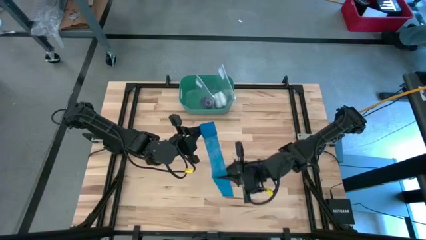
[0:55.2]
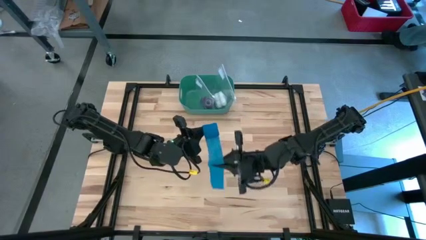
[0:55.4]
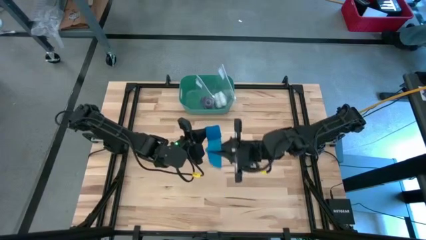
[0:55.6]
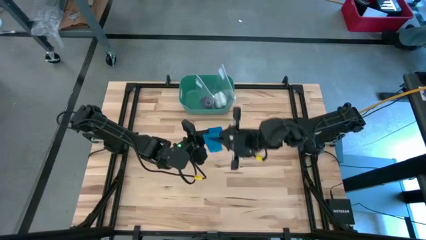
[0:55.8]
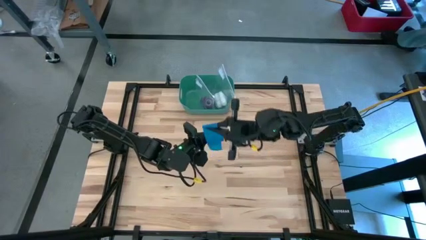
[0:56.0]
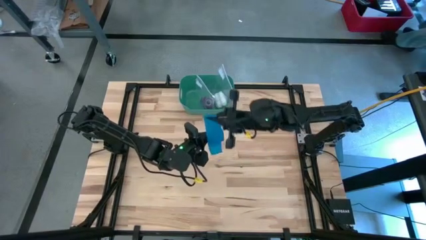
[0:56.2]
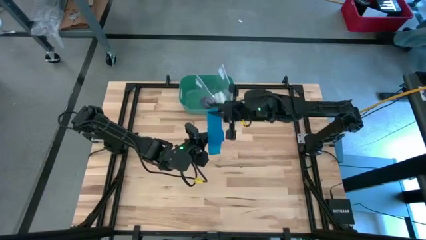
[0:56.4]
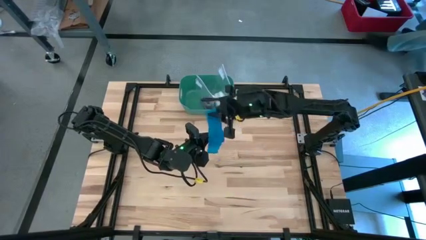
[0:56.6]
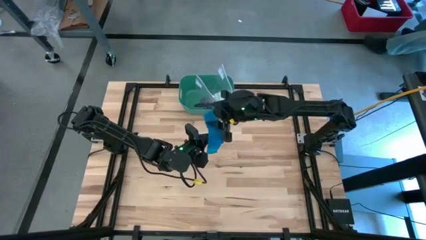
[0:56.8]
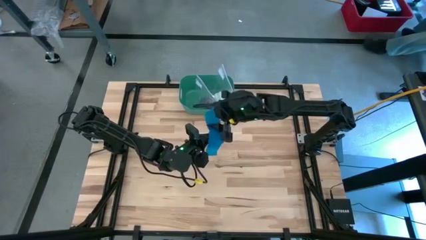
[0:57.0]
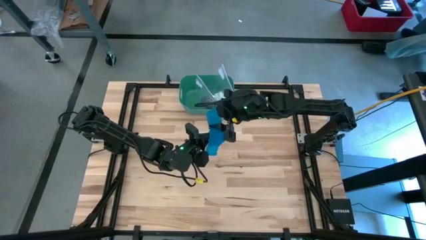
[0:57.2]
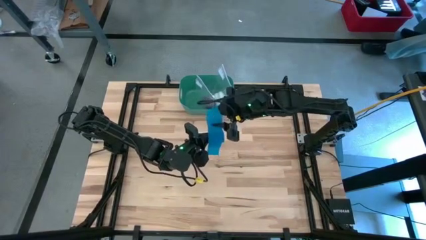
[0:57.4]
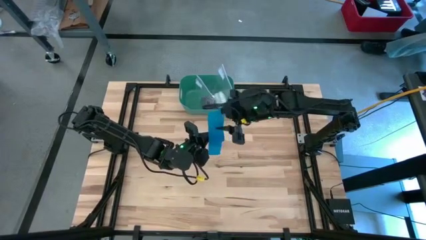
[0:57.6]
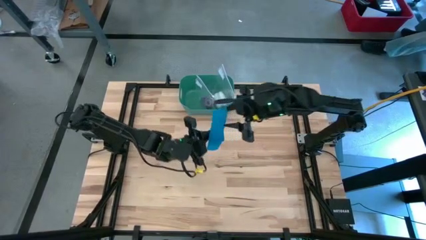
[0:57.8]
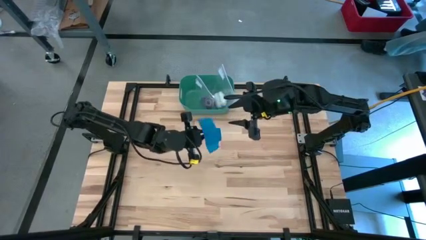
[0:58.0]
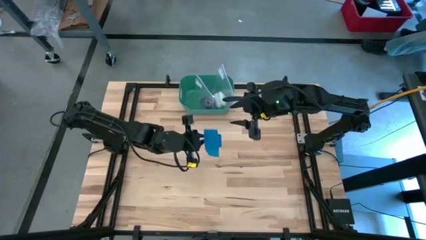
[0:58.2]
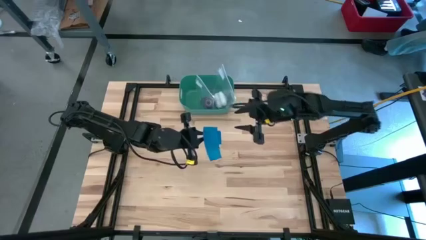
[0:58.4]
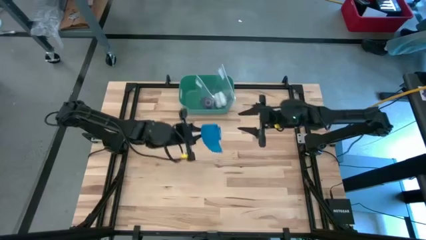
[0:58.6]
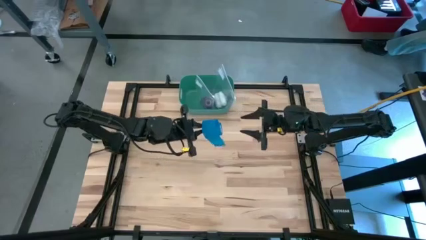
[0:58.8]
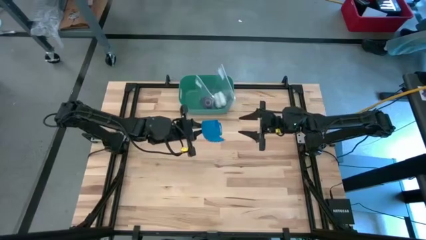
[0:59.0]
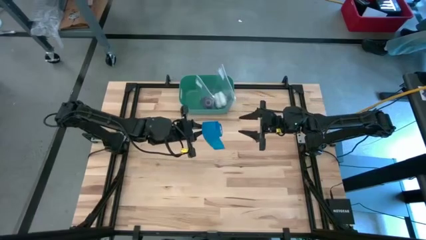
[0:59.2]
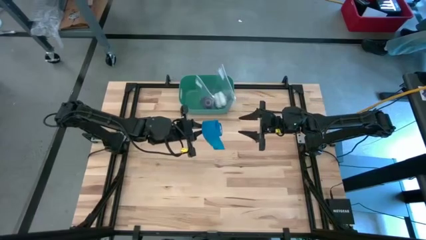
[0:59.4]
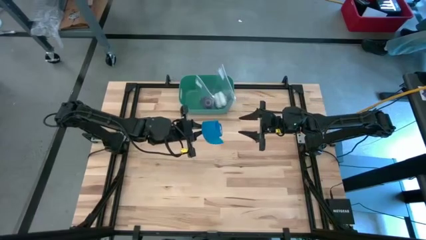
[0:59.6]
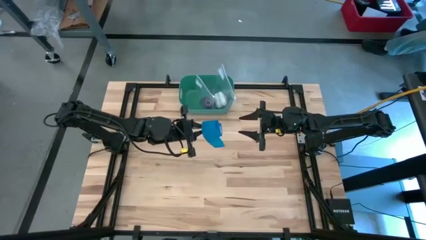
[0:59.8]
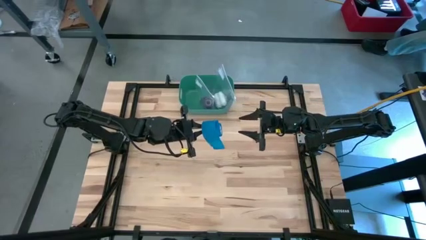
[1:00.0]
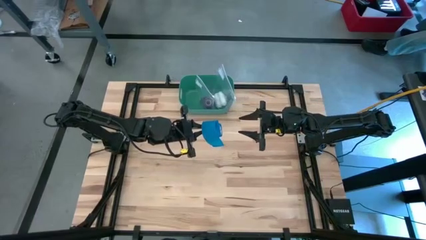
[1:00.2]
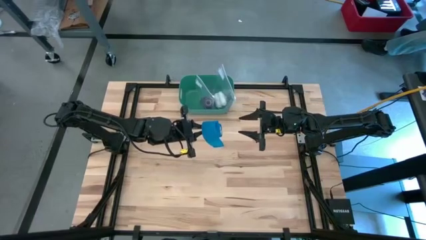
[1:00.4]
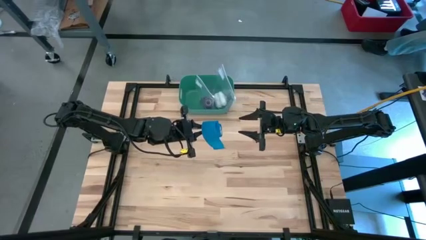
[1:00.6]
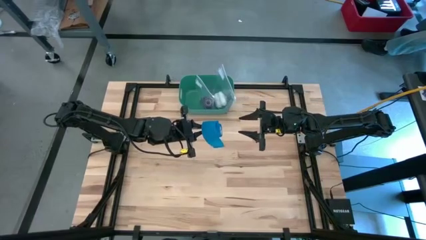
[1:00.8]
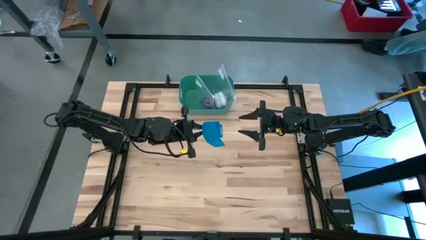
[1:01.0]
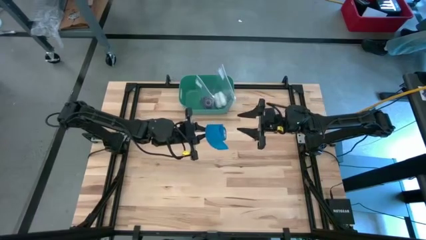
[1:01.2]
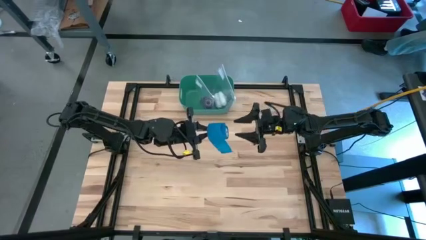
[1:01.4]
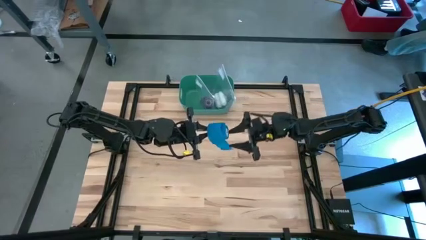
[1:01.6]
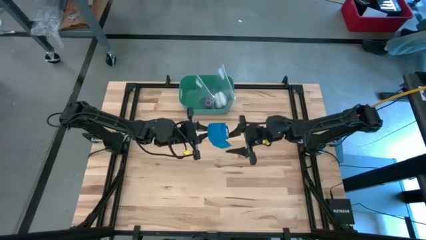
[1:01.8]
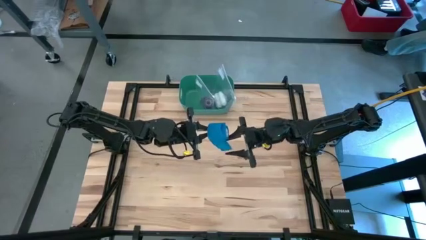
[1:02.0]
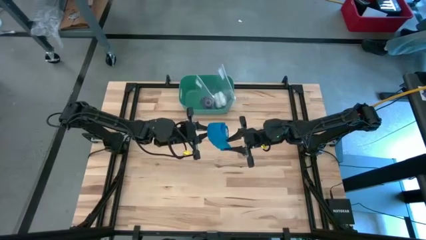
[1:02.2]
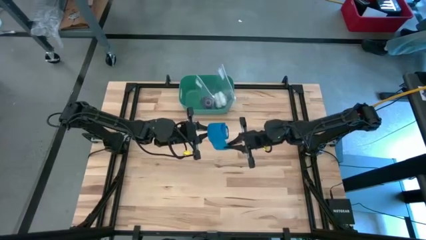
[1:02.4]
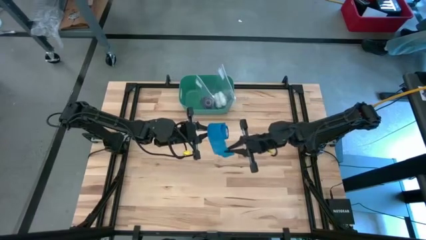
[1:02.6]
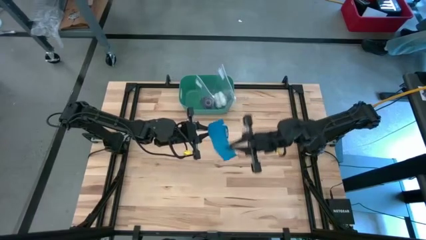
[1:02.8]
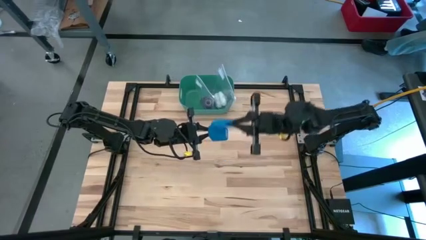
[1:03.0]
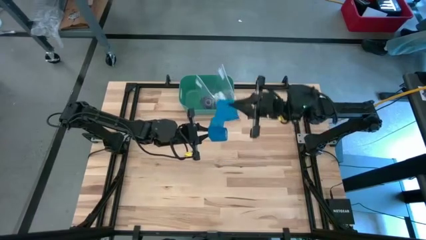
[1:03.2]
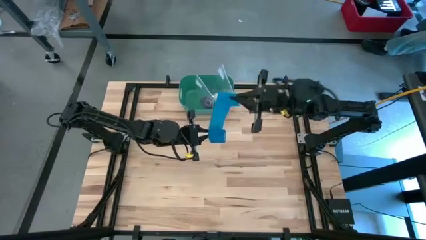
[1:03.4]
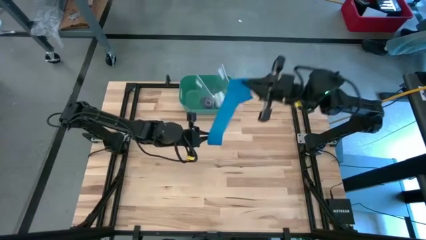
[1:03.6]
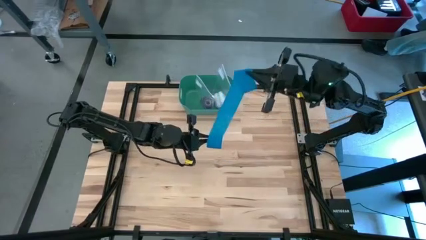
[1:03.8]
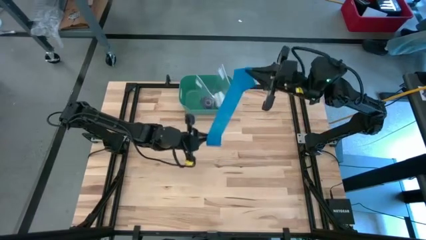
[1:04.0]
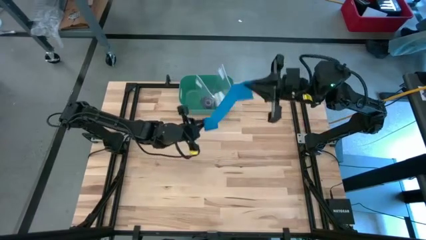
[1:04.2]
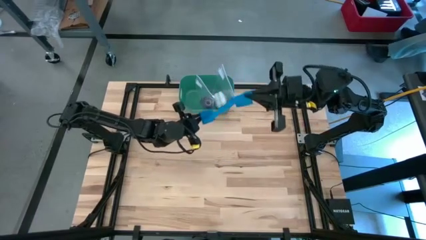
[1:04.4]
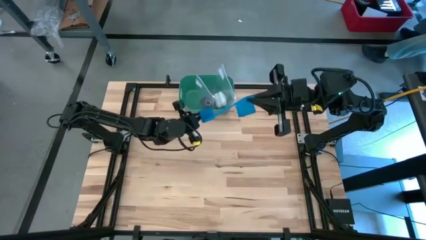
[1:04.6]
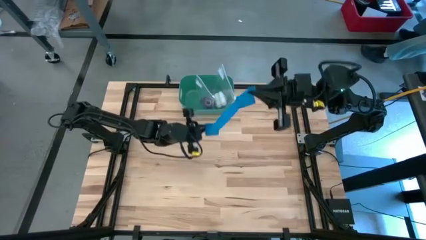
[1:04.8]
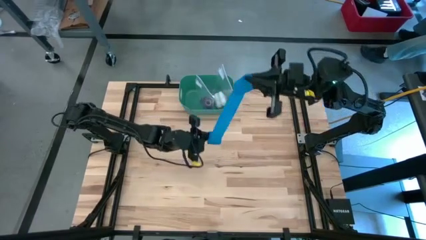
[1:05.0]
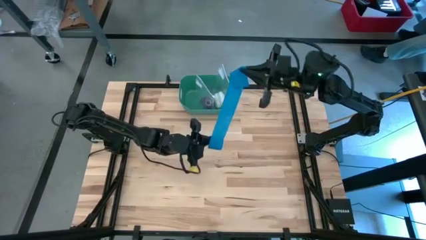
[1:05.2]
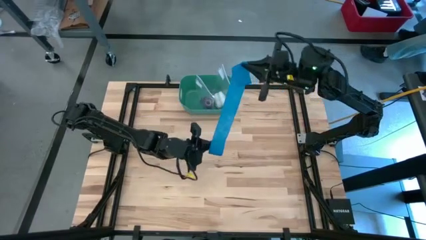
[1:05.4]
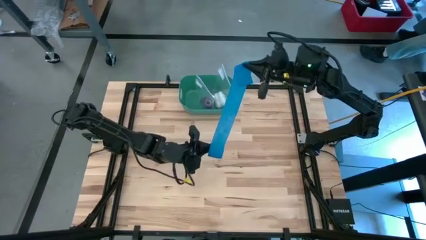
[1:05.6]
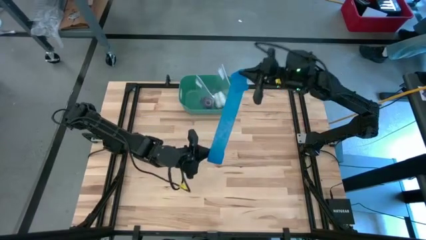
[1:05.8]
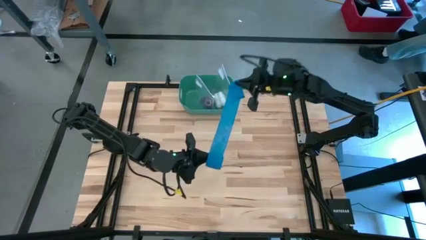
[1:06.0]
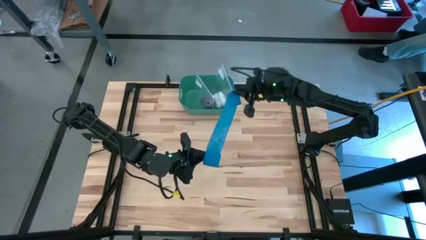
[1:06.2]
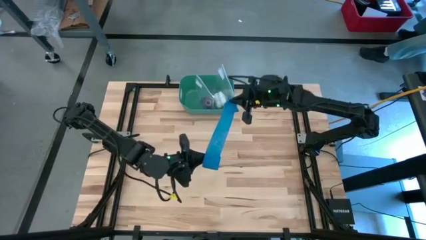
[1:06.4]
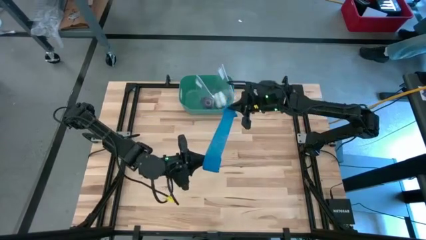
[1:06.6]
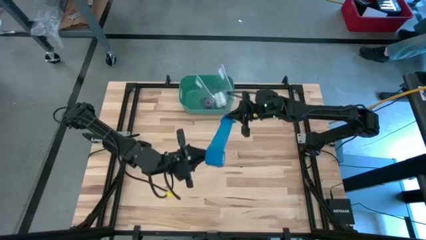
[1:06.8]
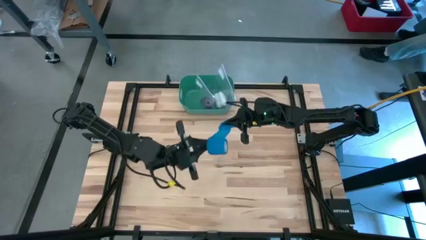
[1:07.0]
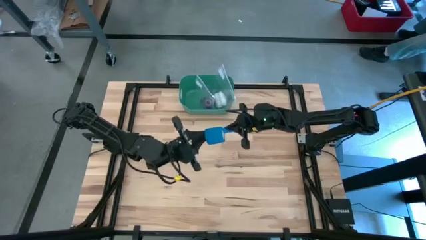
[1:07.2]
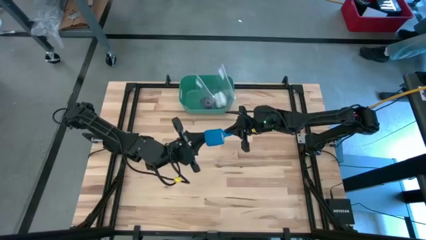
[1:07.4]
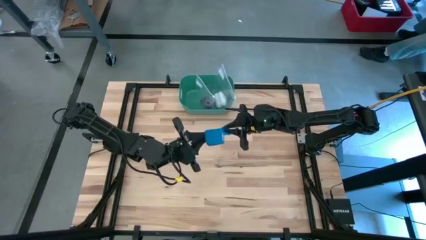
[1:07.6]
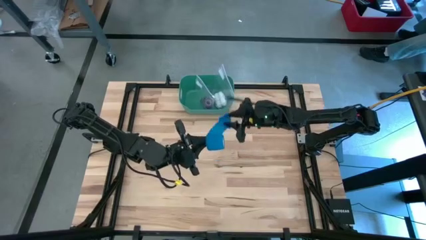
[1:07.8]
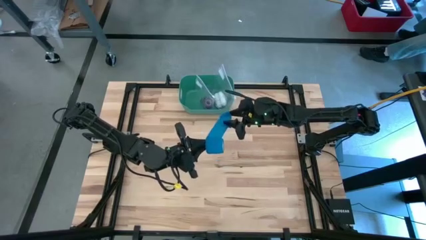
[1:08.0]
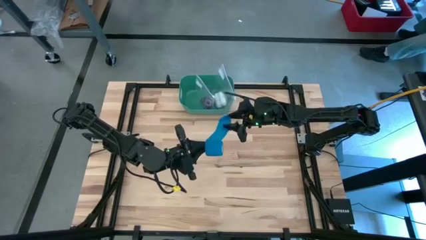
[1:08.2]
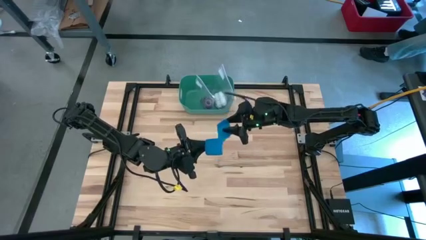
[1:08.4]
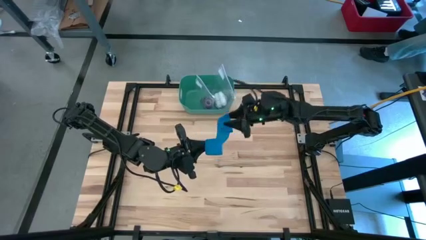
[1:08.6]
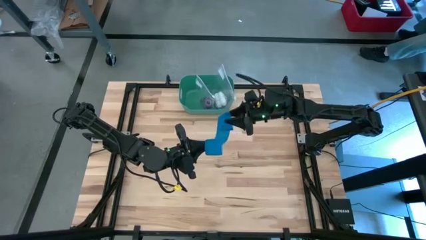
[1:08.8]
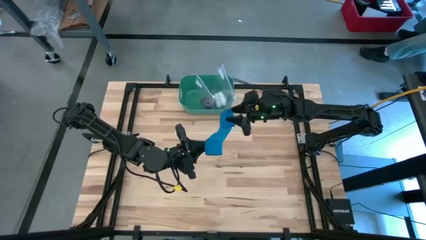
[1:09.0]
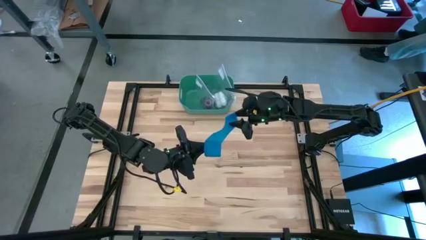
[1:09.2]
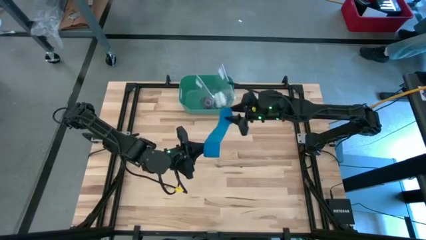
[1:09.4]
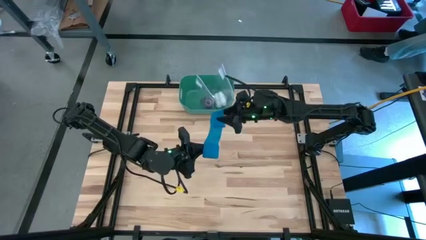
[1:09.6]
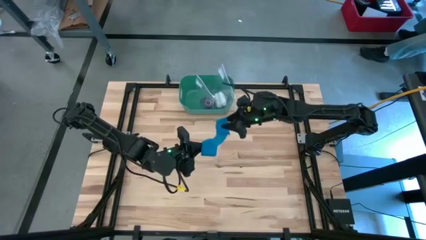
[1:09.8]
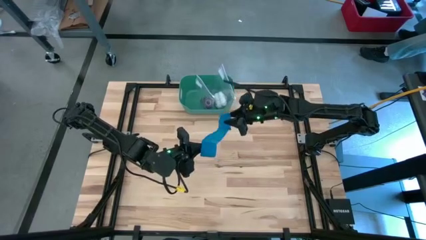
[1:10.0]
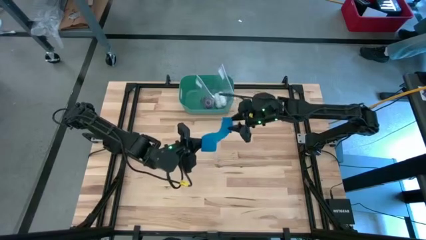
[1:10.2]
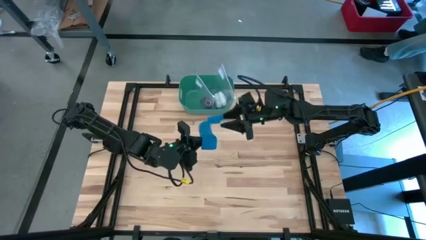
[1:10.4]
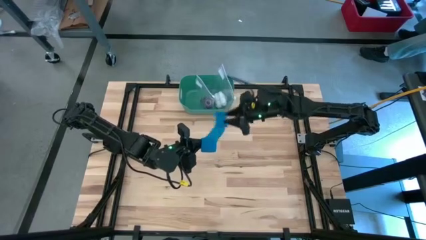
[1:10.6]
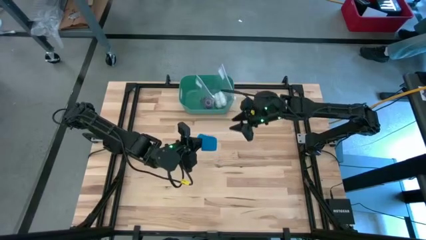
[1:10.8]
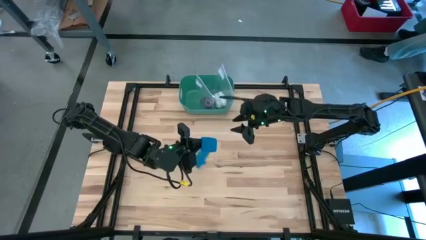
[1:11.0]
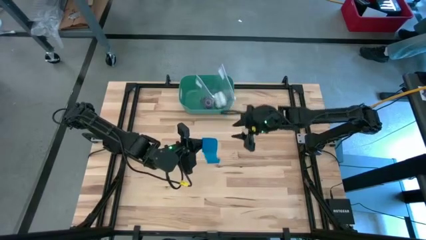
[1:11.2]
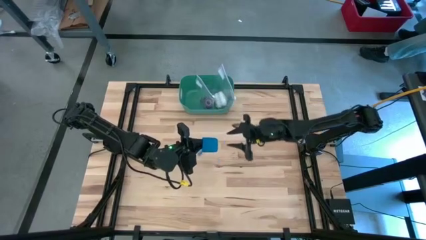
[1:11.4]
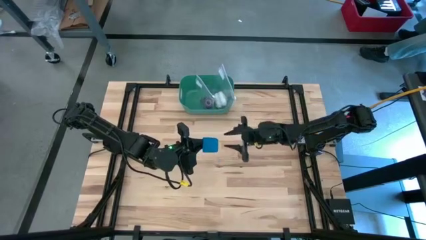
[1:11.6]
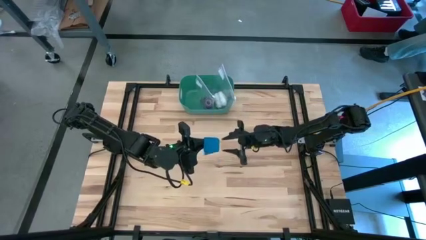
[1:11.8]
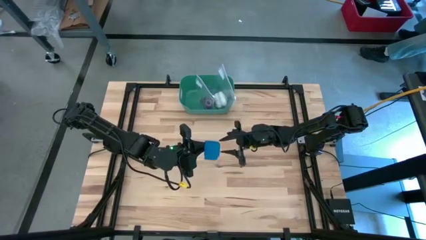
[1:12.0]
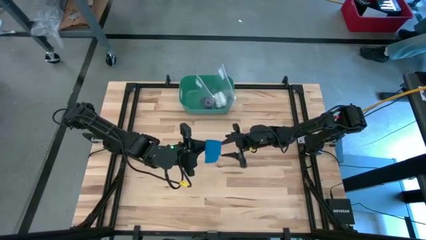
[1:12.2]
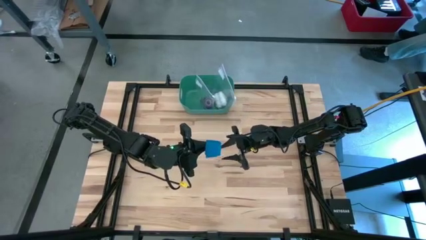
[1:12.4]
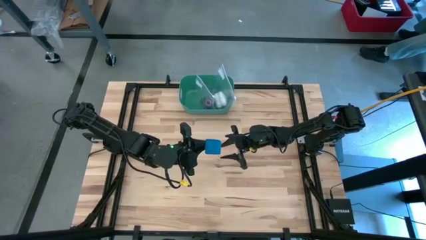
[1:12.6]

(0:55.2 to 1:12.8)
Task: Roll bandage
Roll the blue bandage
